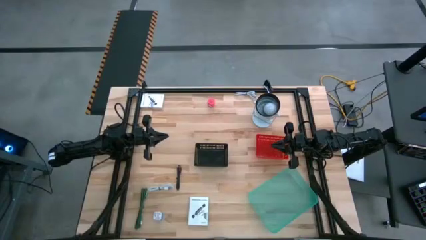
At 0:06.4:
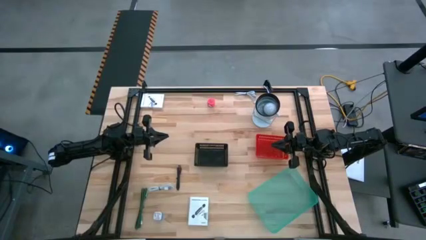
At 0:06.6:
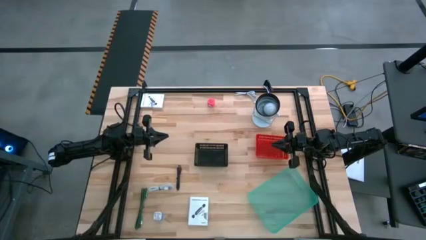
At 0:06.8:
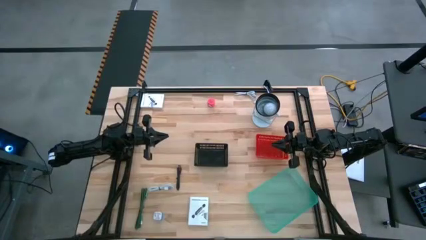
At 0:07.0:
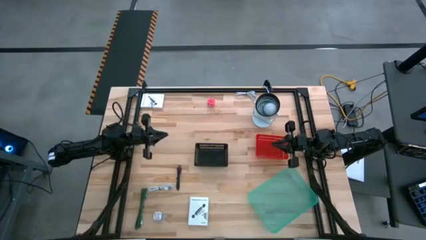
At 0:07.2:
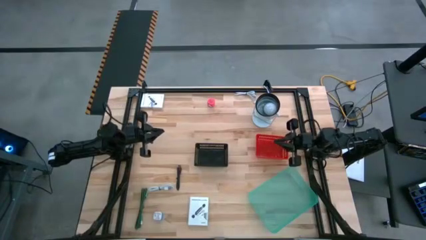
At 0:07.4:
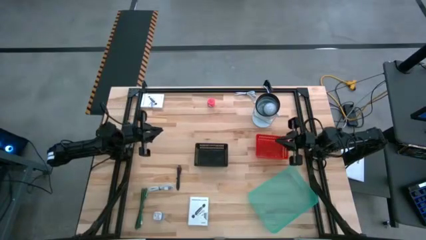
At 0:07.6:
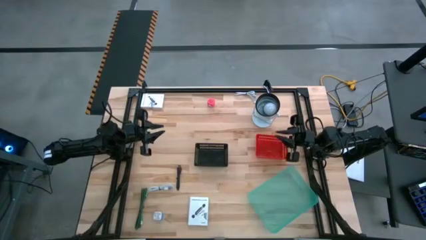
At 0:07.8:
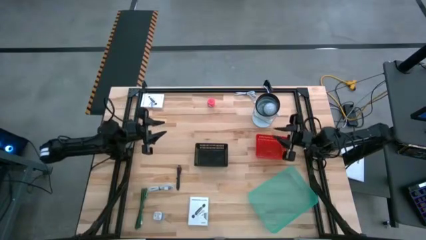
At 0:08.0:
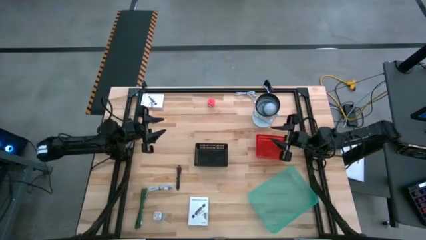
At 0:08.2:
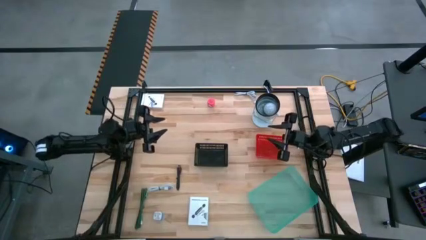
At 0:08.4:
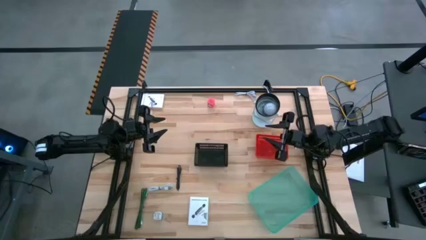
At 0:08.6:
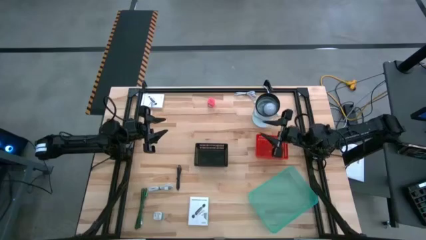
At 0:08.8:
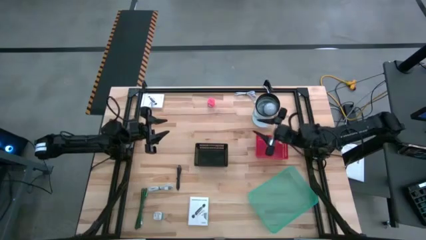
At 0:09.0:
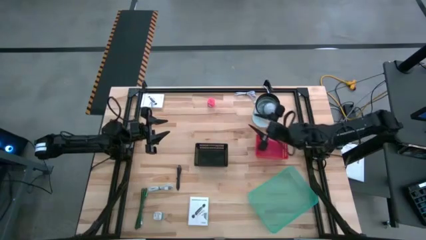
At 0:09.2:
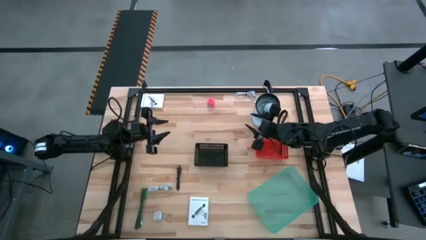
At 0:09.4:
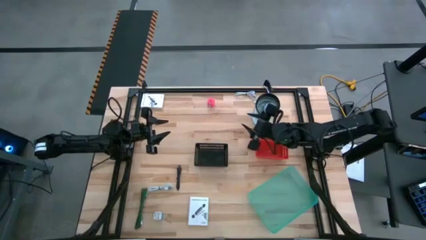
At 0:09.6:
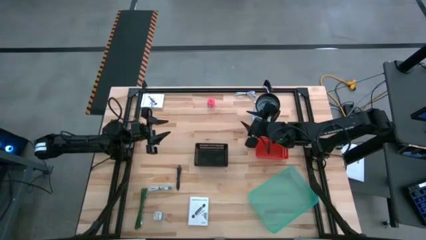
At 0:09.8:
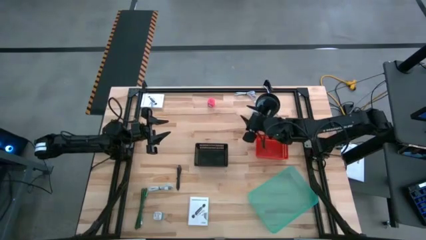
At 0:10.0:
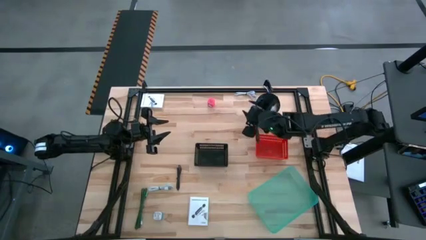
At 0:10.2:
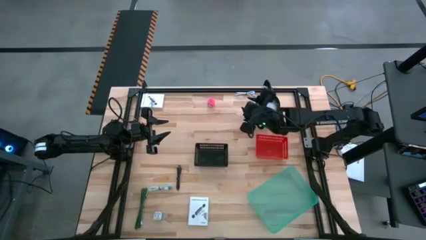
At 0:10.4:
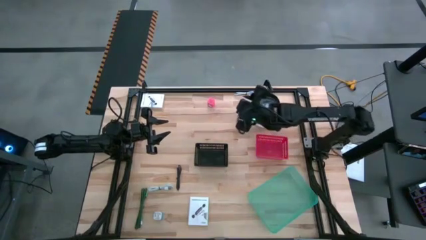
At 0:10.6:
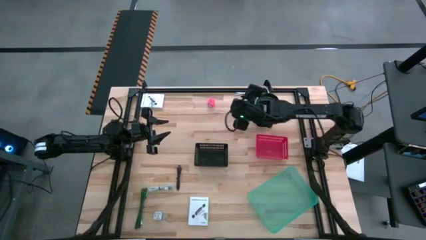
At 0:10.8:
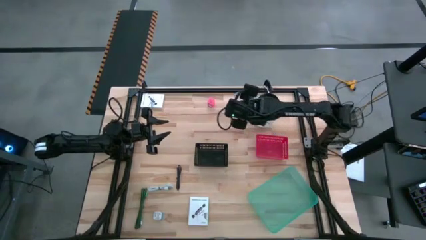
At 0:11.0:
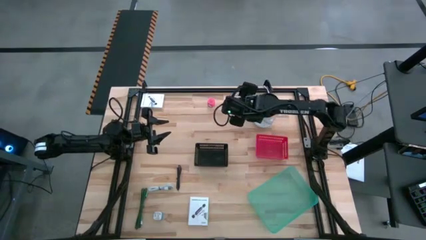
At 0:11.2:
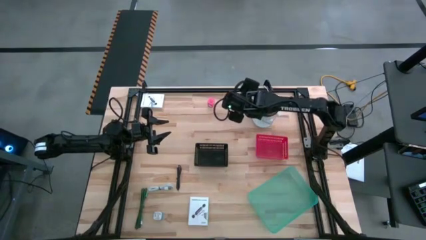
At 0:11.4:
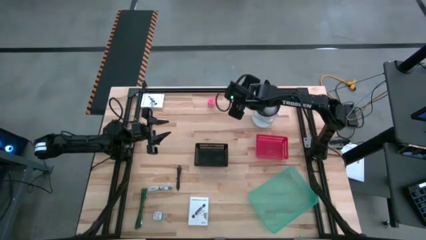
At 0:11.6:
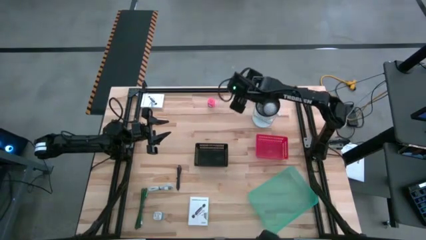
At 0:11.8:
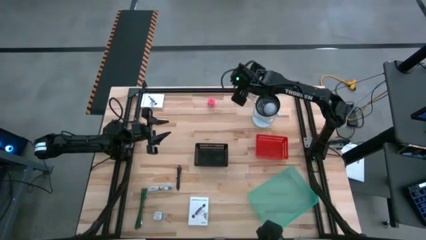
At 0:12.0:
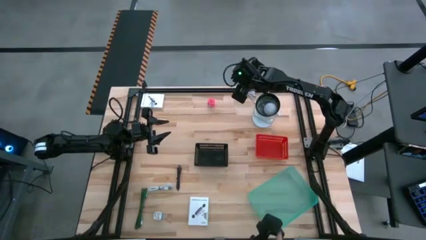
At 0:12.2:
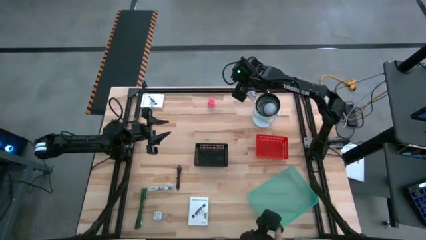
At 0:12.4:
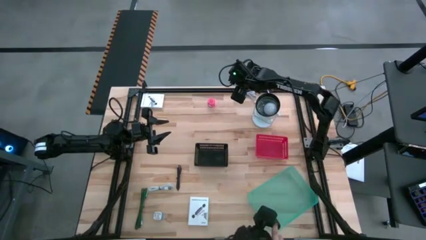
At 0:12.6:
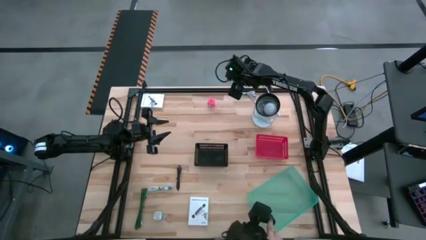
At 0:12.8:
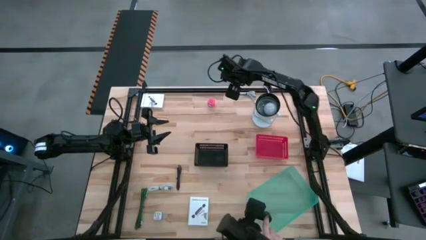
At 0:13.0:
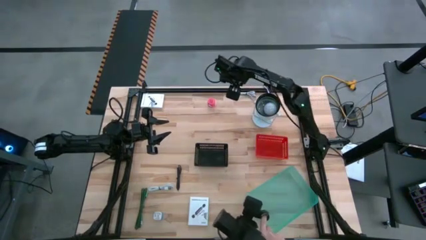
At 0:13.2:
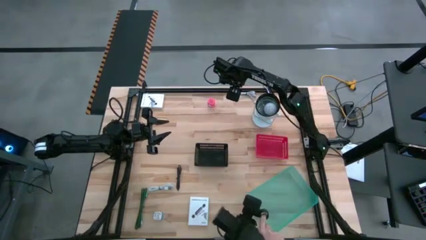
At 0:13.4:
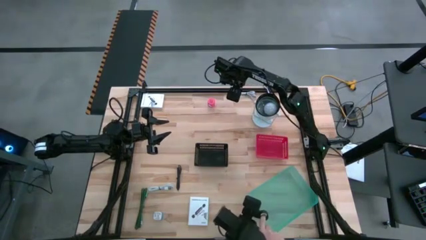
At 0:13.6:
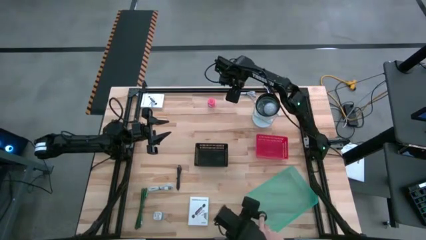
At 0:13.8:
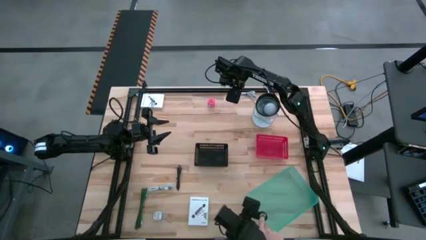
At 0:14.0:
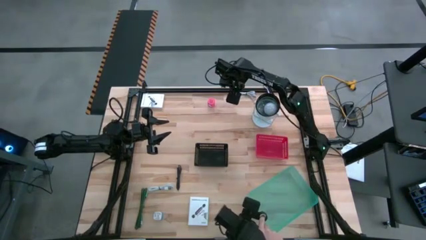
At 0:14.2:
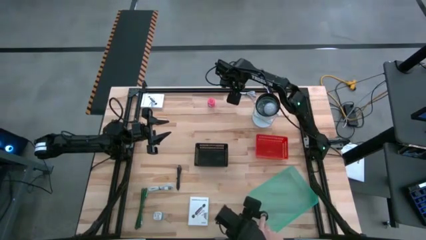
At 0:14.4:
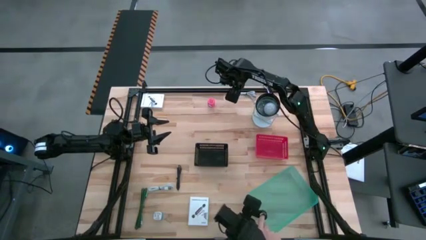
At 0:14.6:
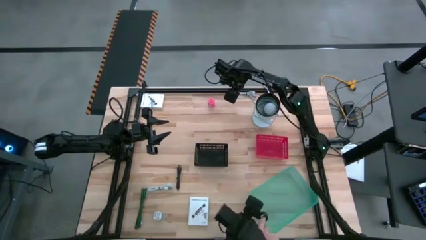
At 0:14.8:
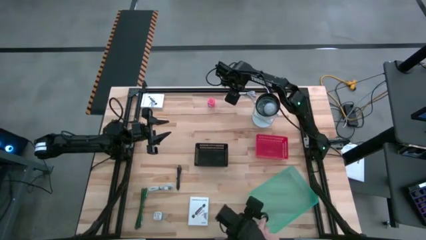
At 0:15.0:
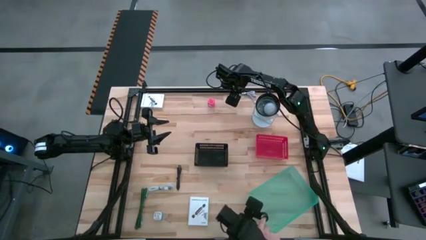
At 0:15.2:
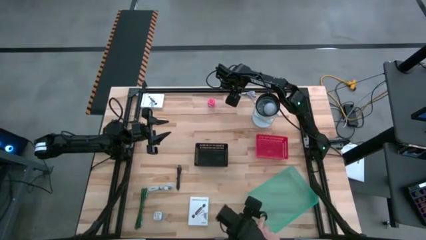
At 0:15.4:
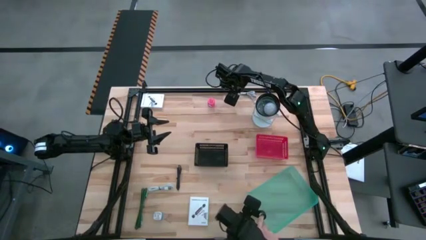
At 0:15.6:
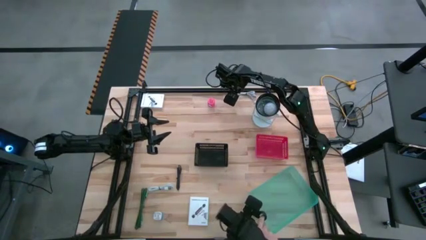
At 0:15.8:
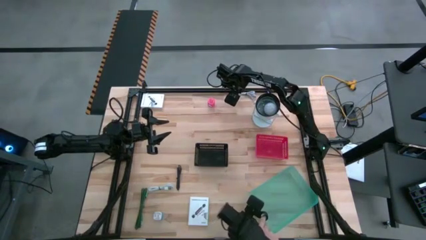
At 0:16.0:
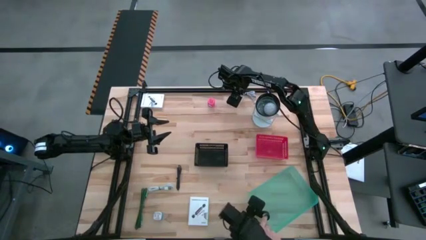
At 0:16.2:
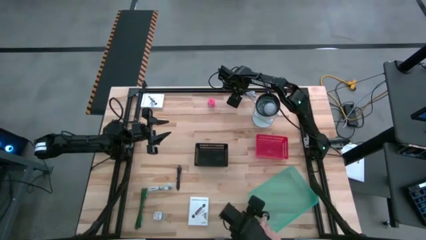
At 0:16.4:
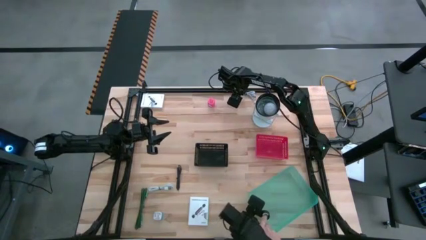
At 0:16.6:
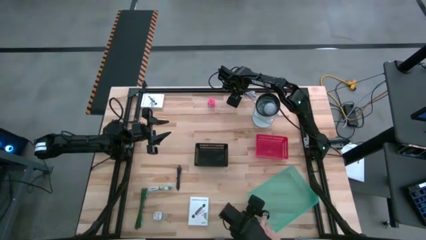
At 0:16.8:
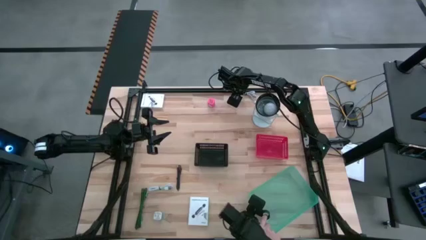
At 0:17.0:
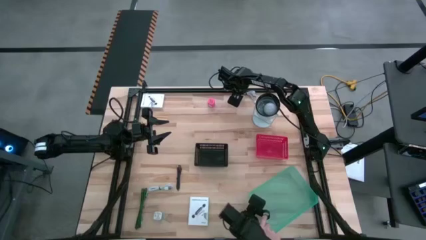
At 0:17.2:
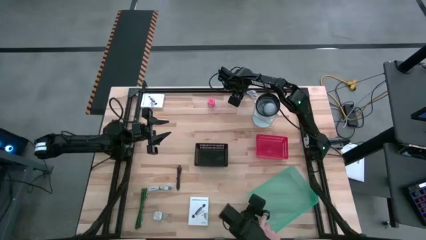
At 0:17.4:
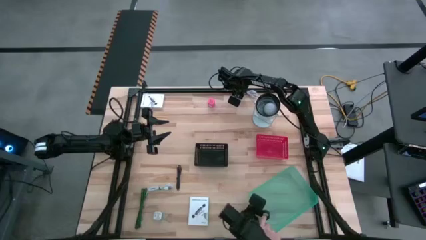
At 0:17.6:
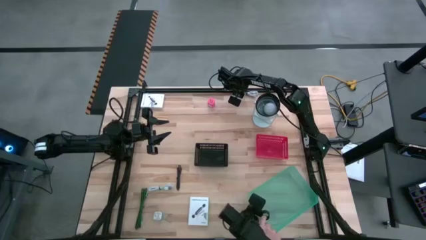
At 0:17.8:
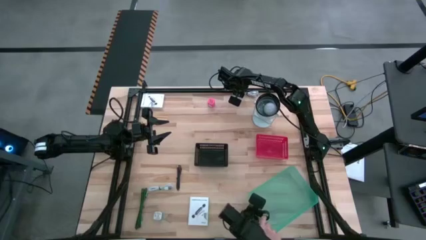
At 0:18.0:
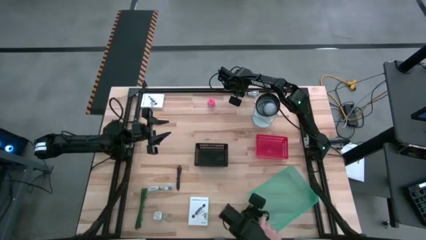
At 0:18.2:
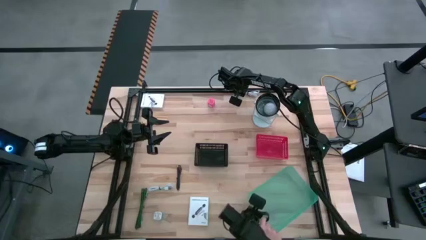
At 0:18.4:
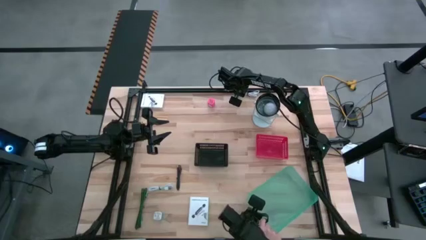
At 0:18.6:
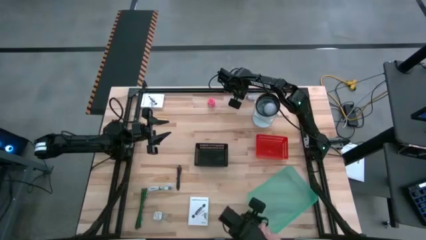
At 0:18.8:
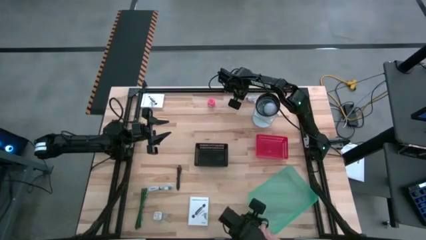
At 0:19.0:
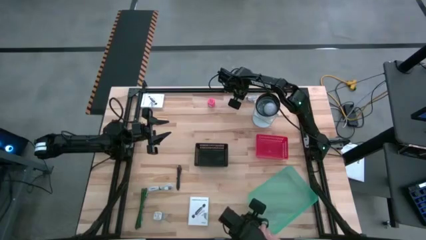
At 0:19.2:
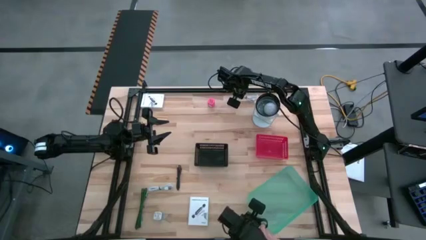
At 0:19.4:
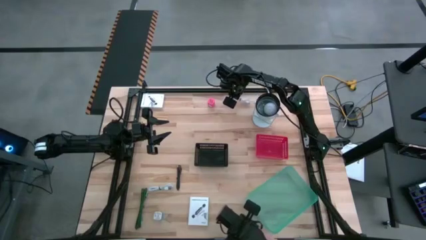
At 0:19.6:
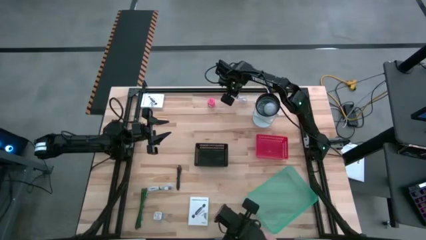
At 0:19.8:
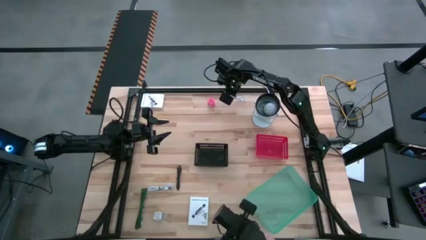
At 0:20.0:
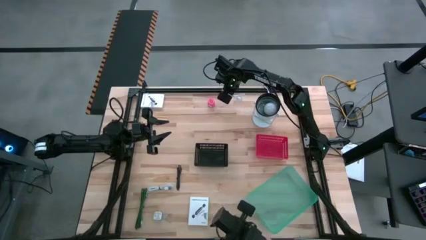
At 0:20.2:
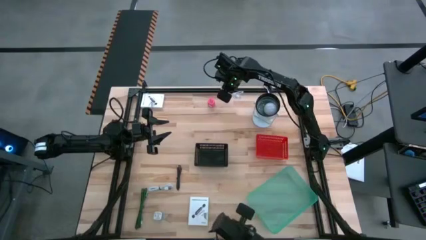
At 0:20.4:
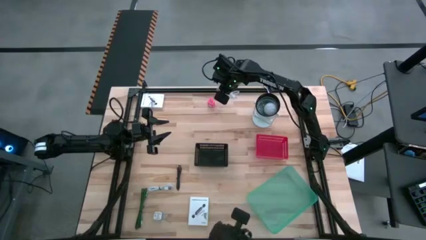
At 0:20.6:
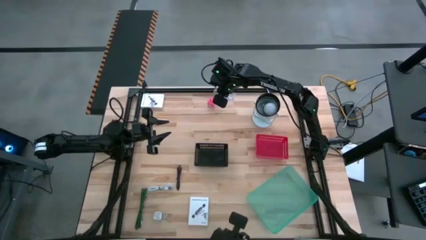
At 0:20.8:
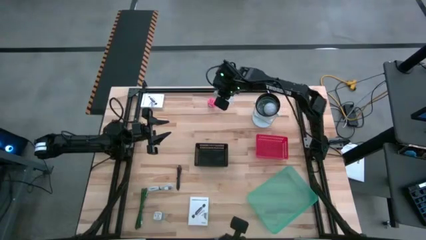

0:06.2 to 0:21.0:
Task: Pick and place items into bin
Put the top white charger cable into the blue bin
